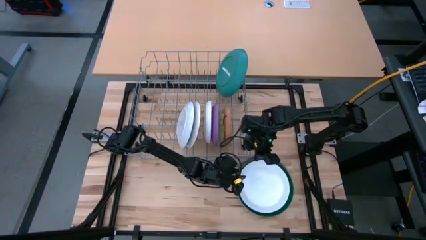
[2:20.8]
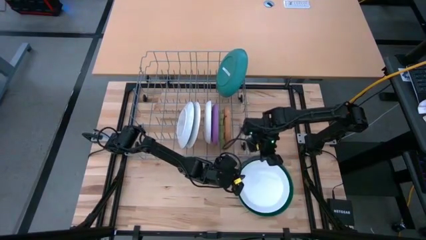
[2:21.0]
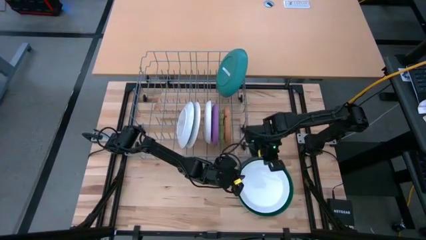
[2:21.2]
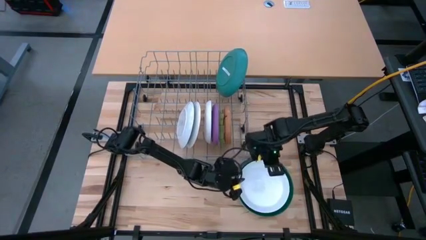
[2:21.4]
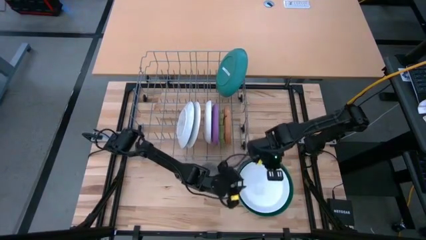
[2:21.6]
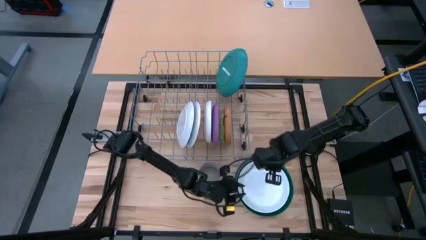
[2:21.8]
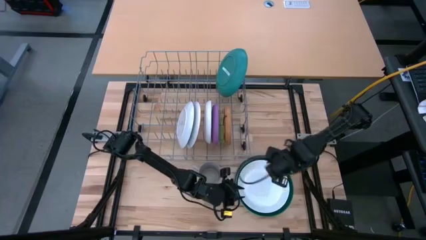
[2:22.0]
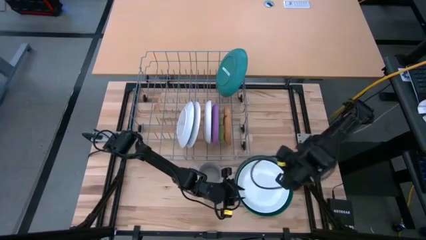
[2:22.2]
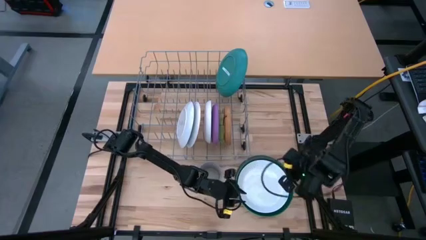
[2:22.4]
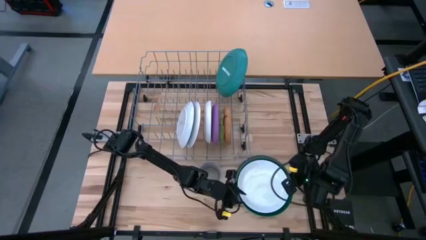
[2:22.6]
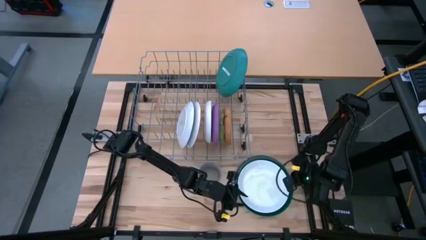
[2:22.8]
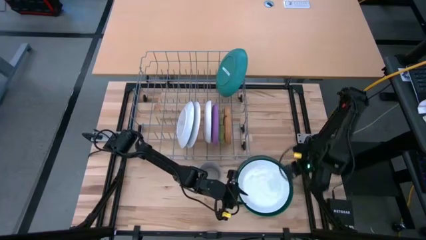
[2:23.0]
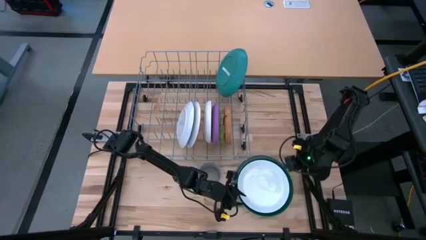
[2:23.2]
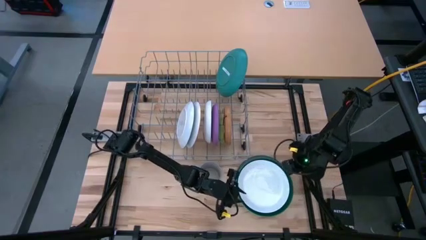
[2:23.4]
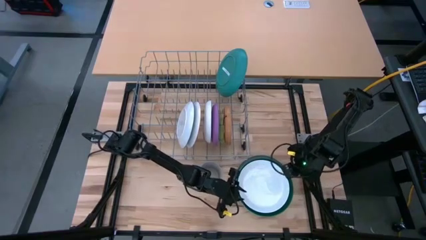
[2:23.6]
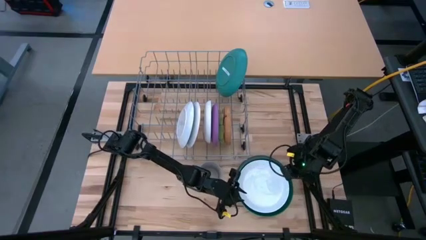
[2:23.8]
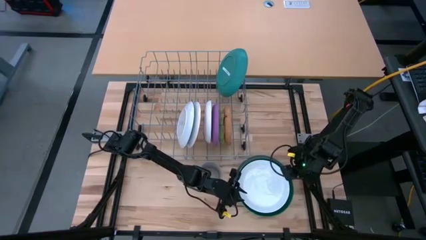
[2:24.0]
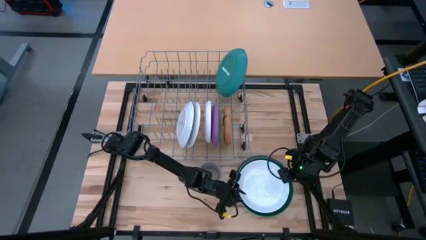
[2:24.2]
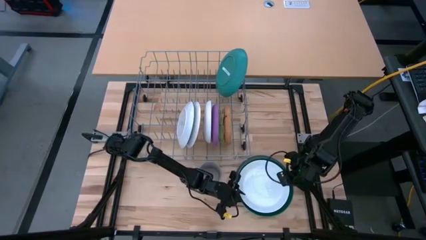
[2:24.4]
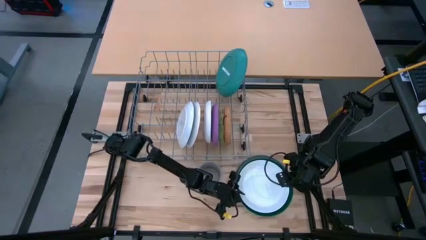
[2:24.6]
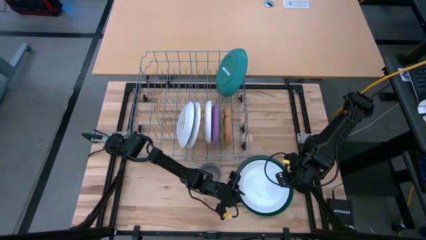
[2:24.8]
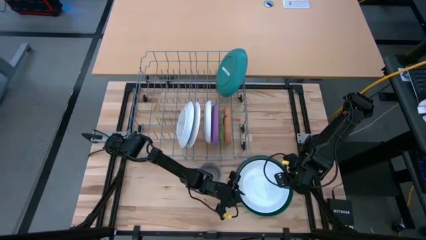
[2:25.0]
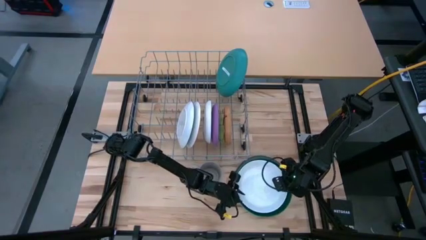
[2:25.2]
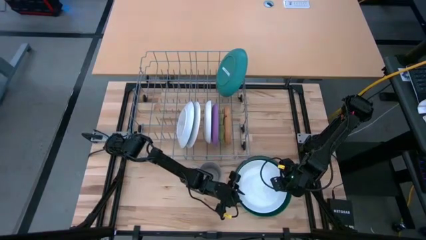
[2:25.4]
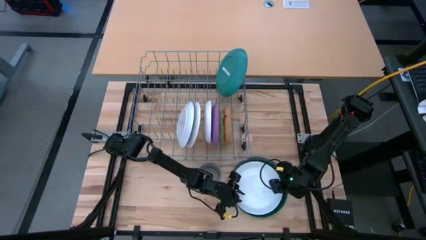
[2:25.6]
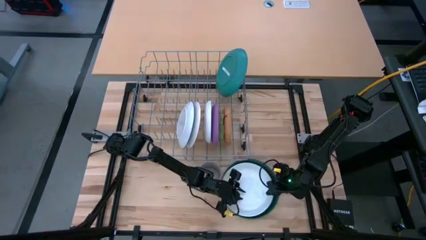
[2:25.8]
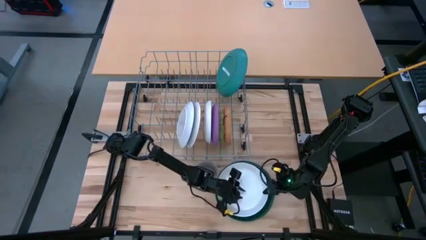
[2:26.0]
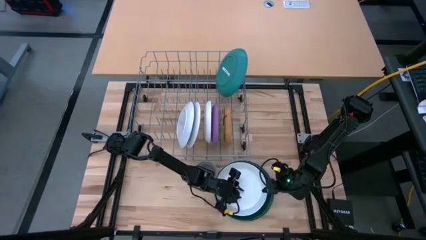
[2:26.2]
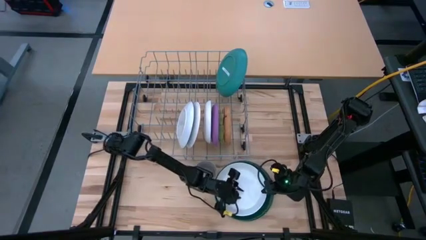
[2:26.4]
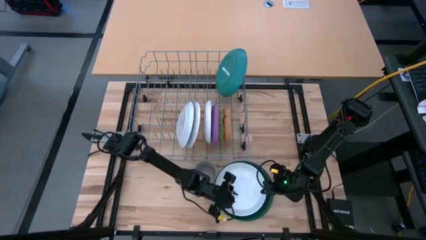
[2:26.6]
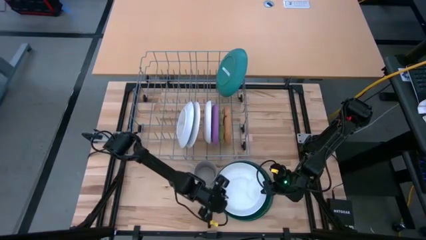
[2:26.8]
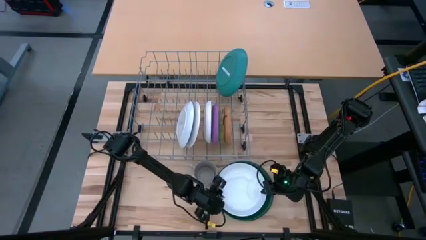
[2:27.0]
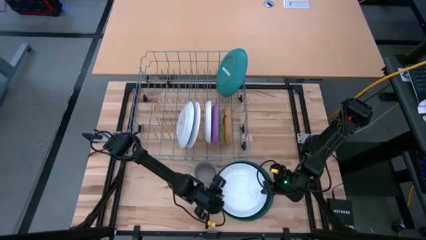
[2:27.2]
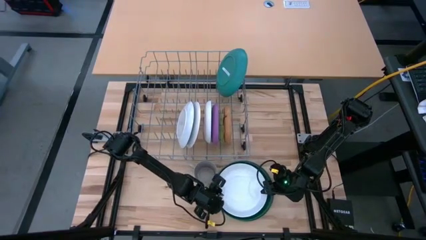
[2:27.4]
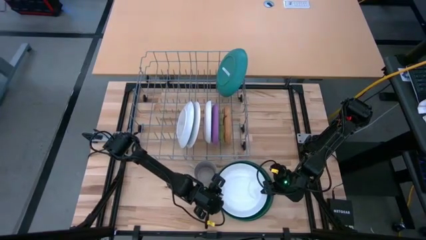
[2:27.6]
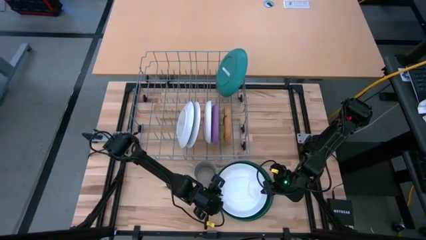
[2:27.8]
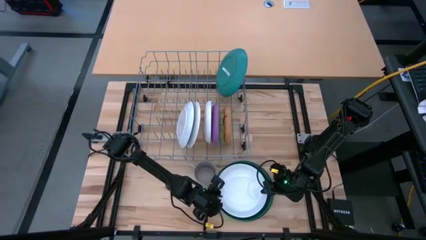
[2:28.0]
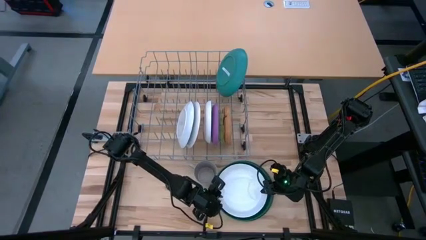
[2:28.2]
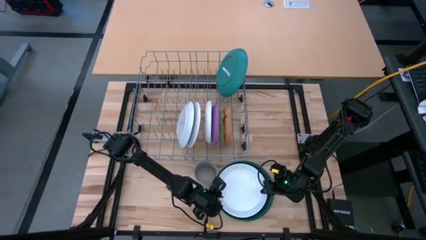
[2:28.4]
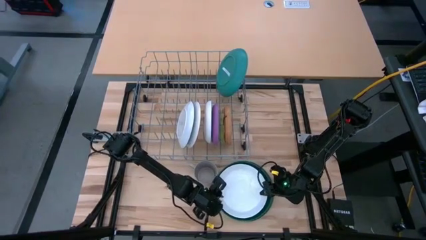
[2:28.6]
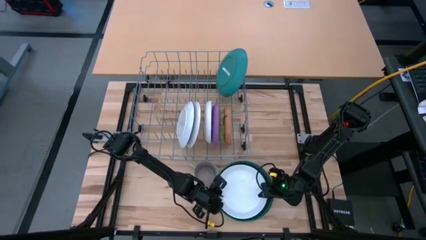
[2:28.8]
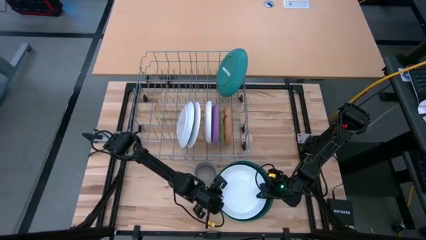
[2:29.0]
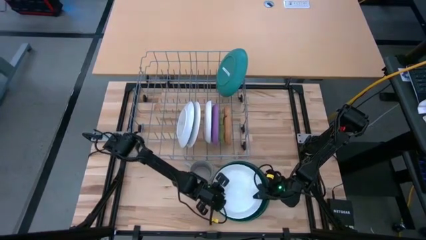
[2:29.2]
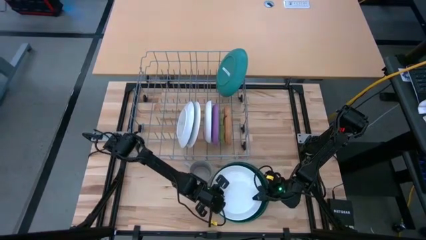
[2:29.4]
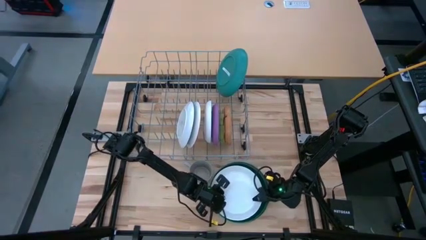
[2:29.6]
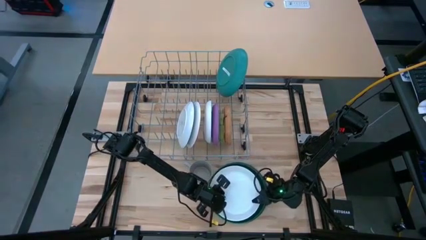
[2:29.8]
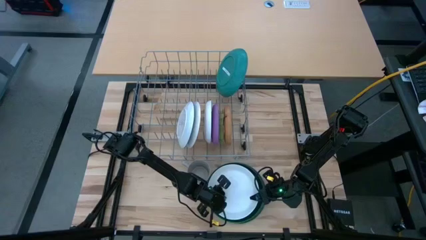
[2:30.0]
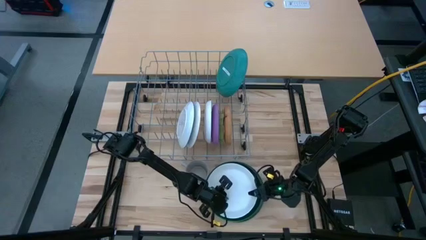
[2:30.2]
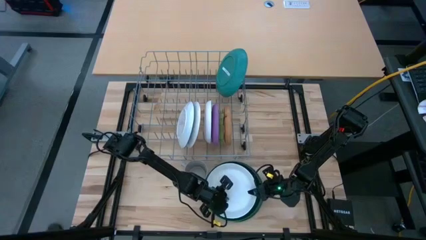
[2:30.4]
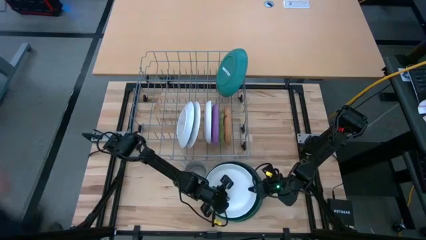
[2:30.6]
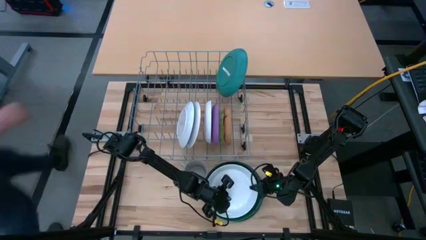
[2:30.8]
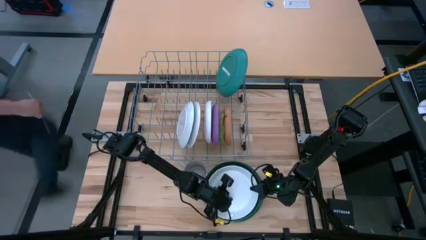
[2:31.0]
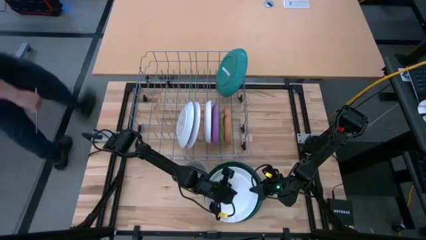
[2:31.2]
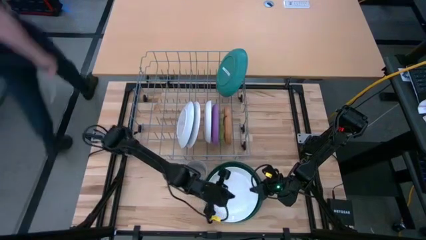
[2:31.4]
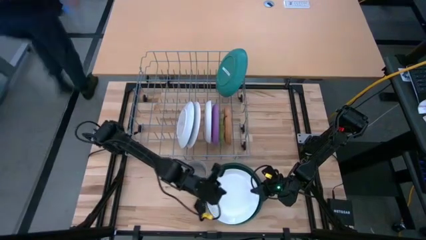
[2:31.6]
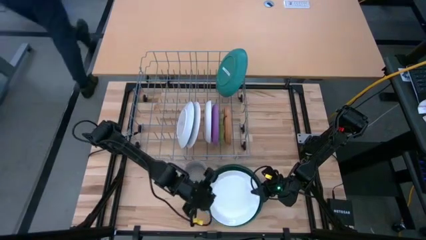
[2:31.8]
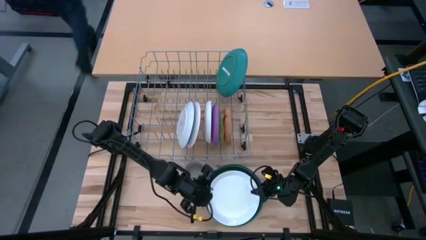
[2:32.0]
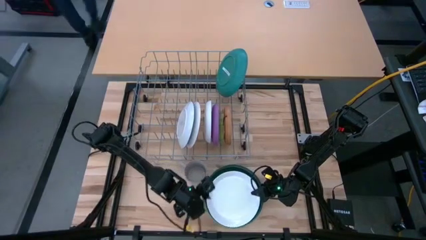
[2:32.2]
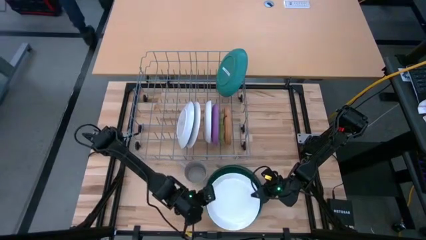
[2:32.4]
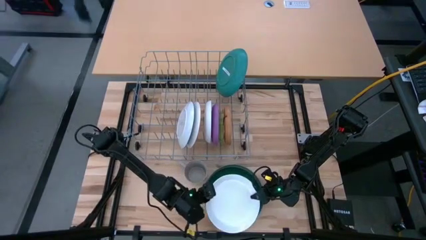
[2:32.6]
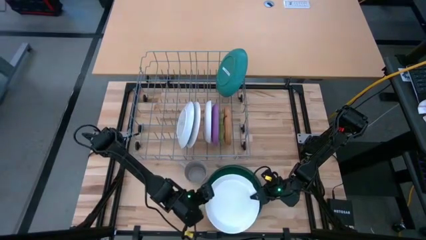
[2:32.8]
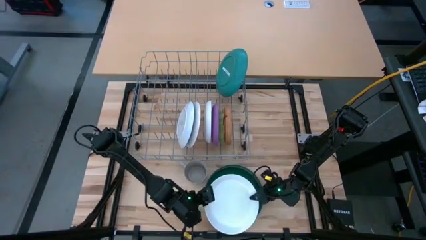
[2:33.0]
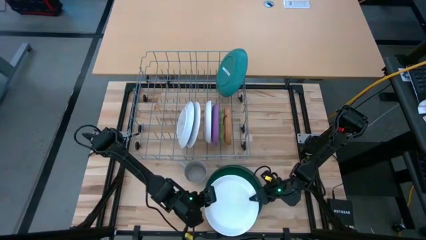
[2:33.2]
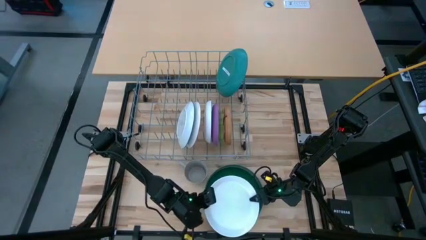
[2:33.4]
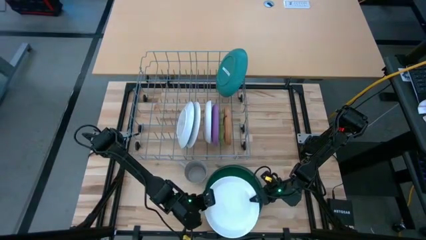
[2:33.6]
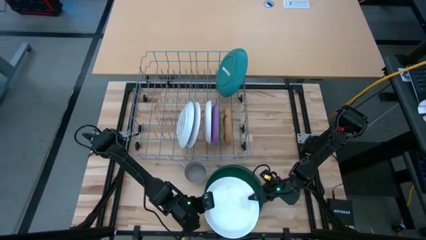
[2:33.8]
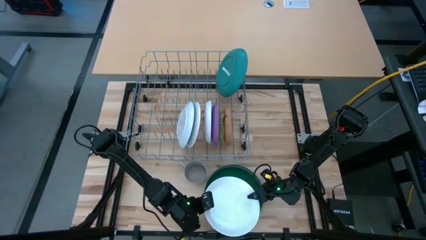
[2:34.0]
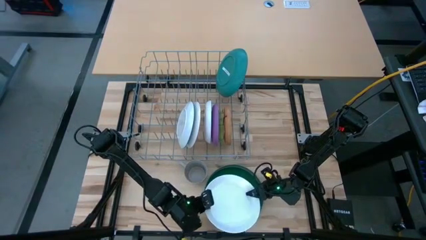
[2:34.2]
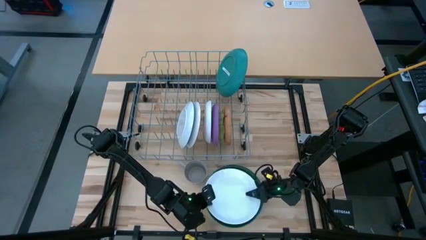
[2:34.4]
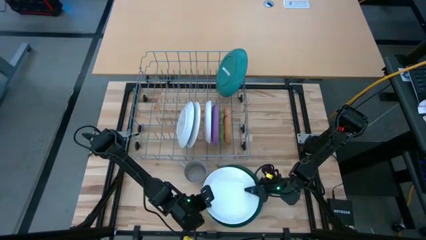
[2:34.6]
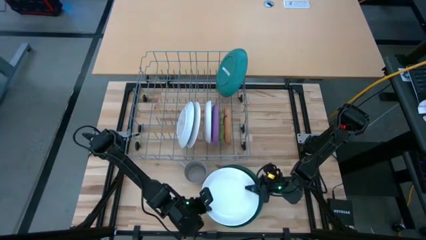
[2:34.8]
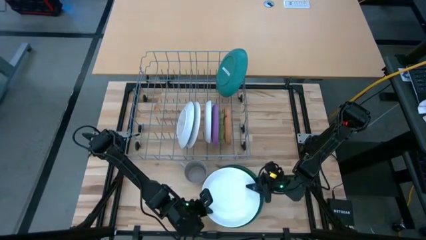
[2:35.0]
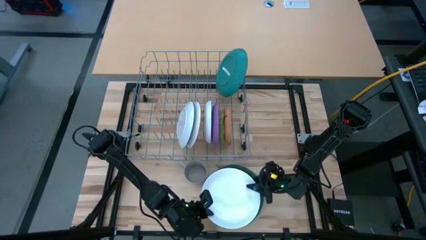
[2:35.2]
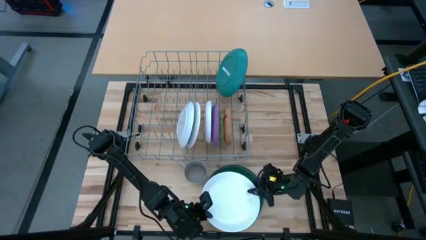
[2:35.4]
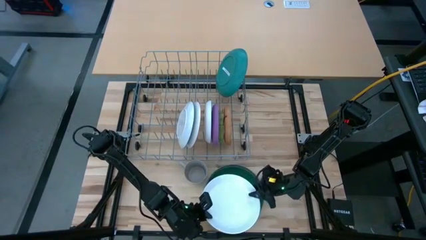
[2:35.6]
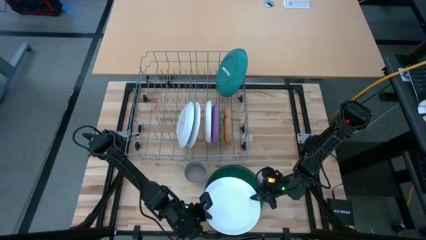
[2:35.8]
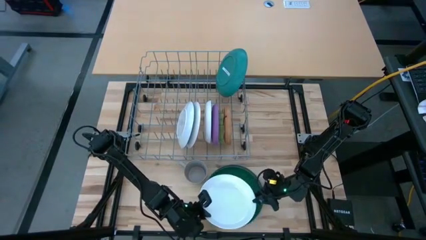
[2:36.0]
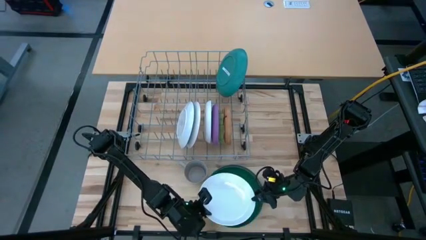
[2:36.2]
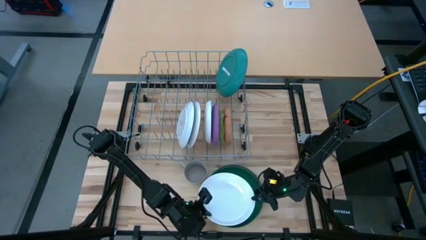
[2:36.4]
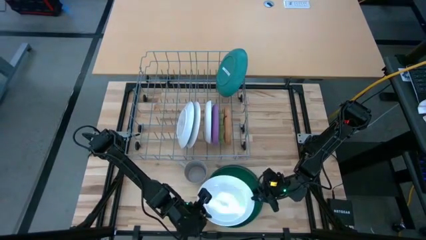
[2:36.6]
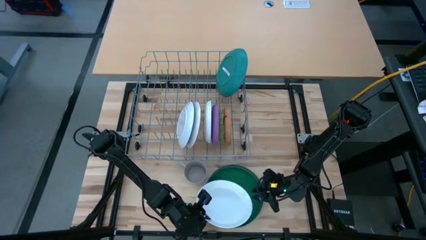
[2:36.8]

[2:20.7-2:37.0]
Task: Sort dishes
Put the white plate in the dish rack
